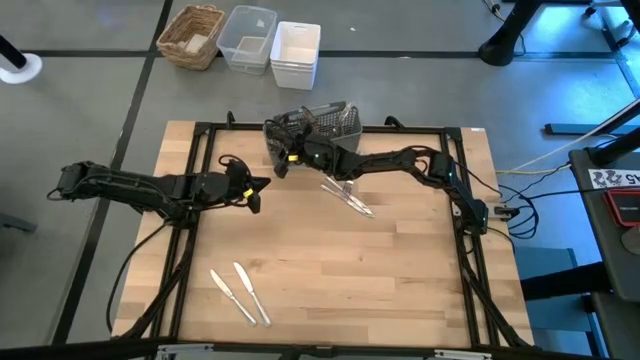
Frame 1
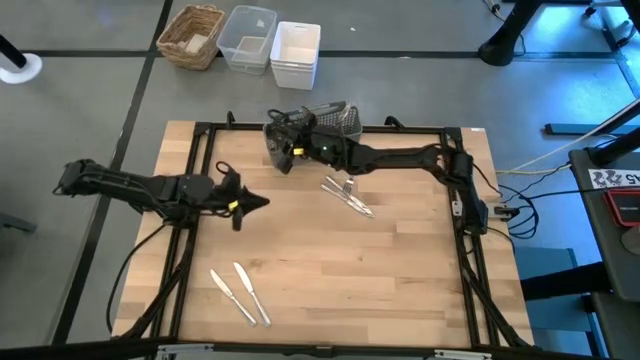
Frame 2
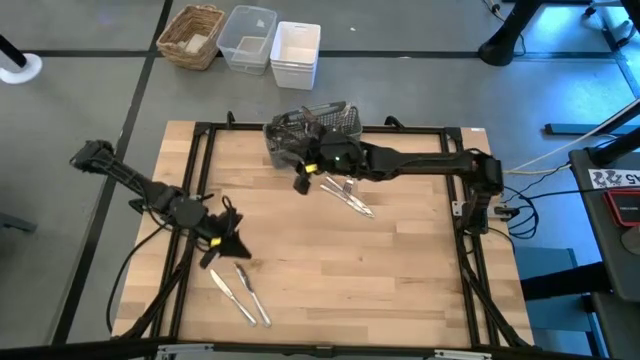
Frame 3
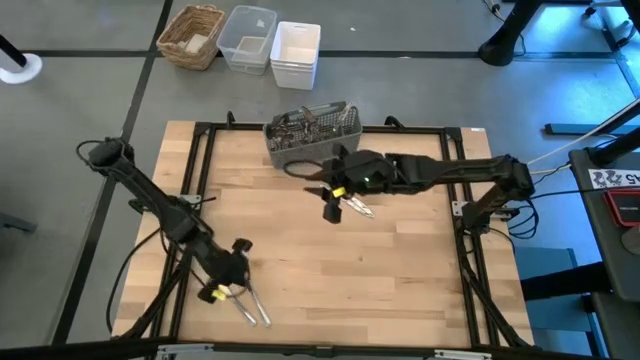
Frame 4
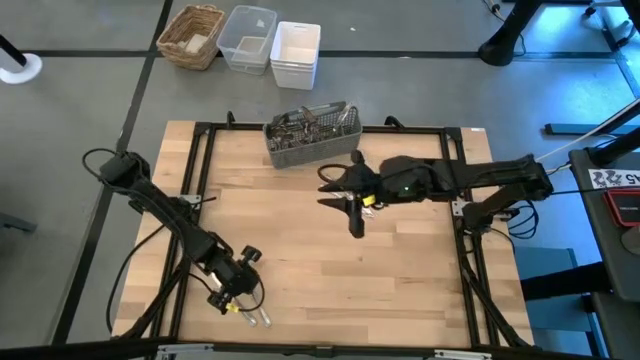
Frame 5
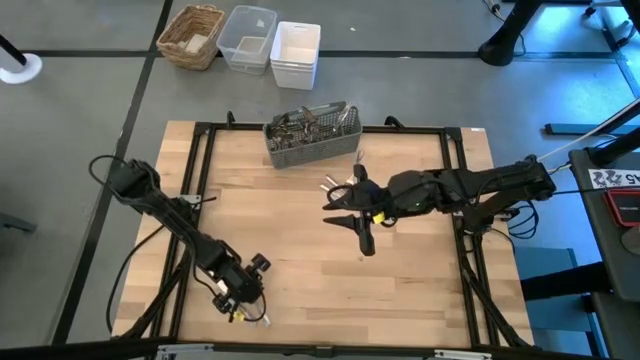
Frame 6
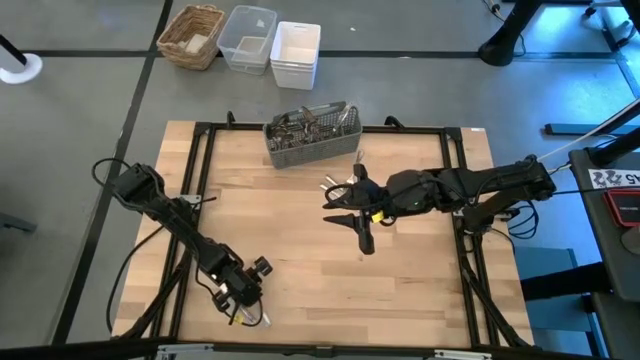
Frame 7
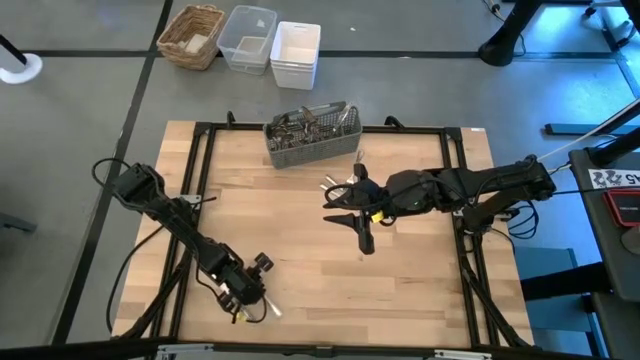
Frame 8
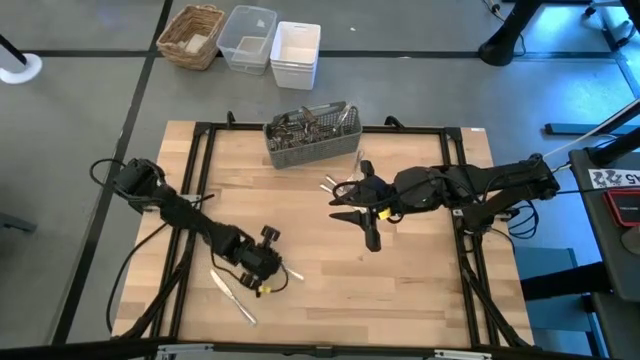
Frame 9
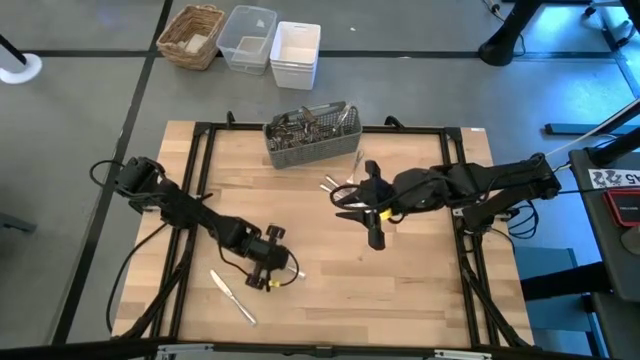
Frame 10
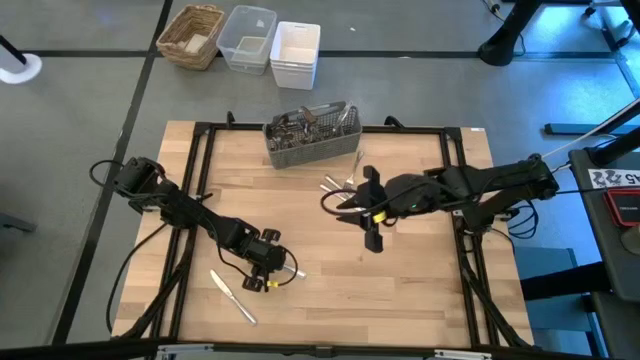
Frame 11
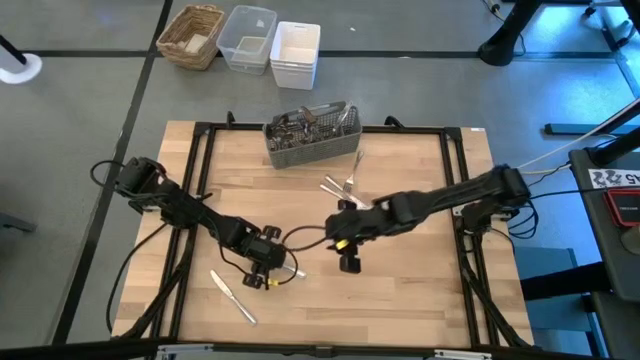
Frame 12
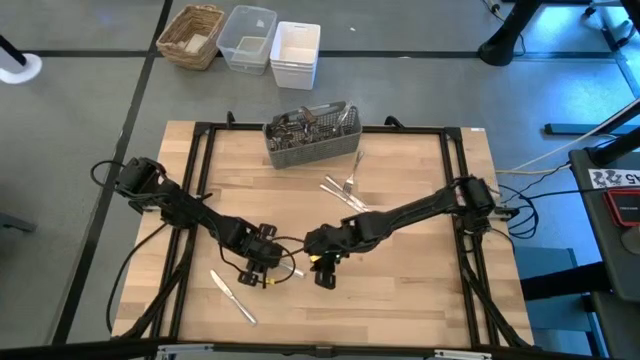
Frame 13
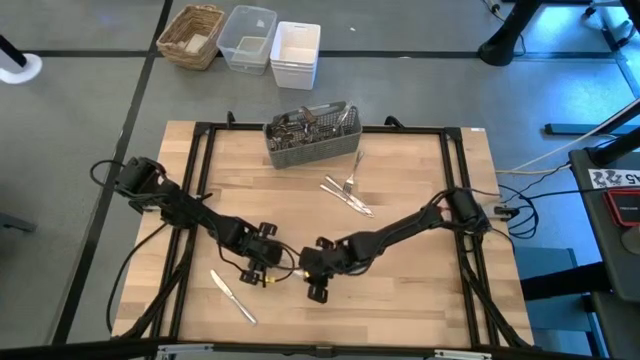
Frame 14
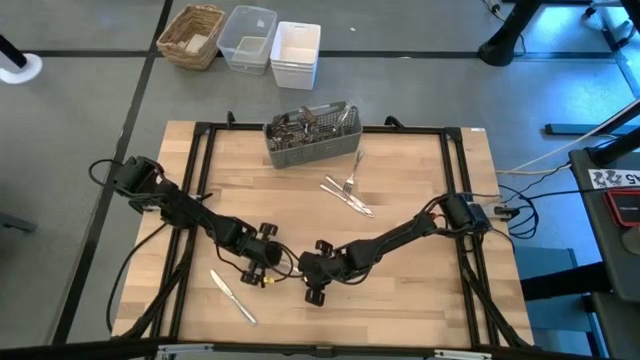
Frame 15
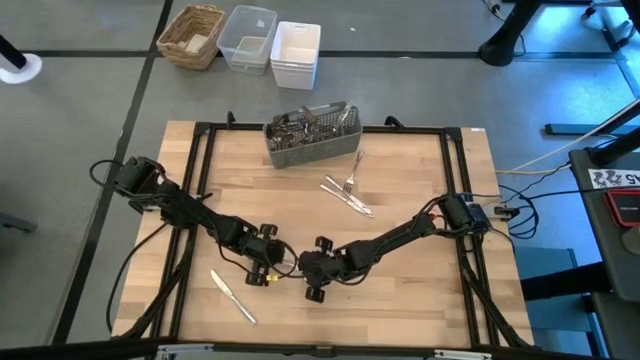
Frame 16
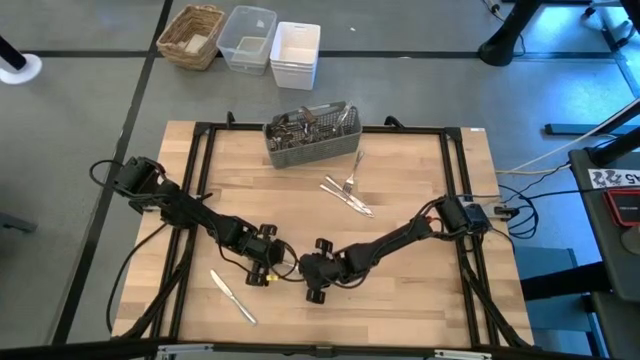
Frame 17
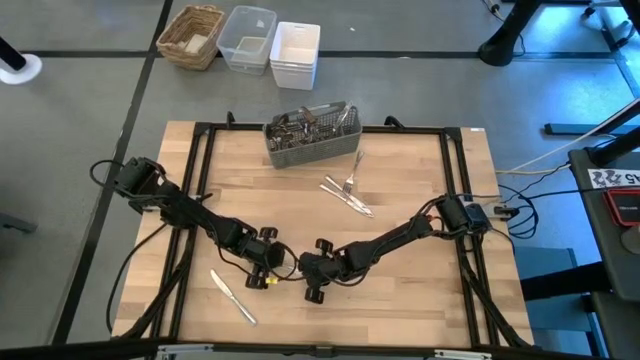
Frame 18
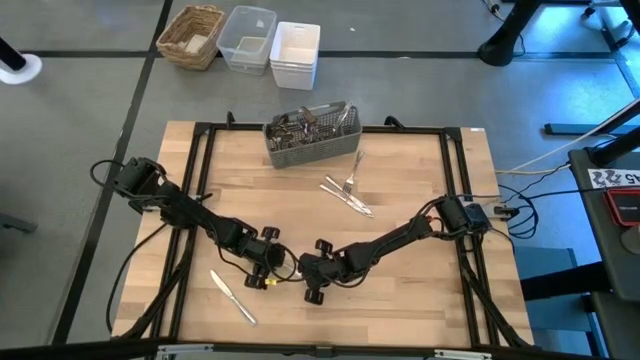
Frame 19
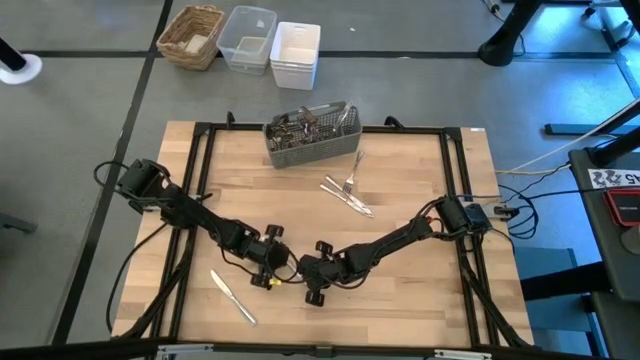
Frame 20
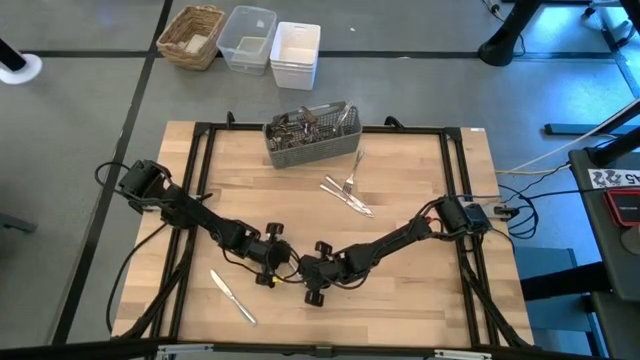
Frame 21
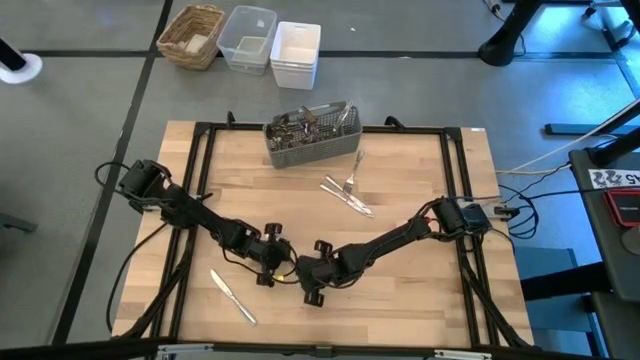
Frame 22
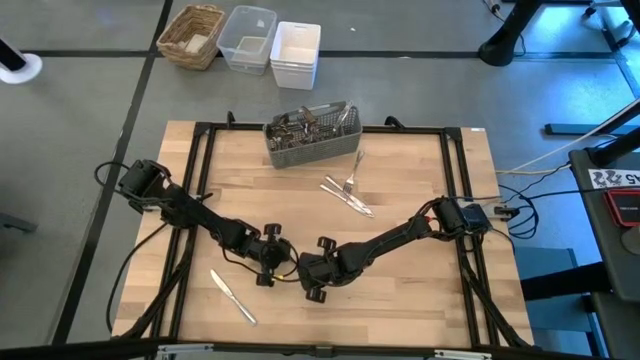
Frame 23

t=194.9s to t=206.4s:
Task: Sort silverware
Put the silver spoon into the silverware rack

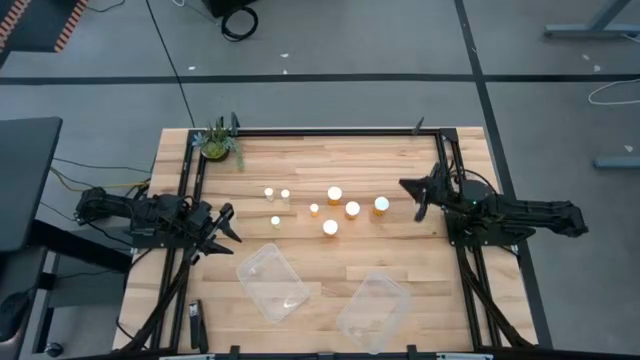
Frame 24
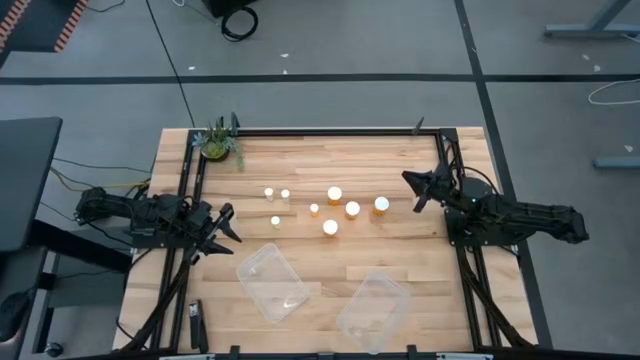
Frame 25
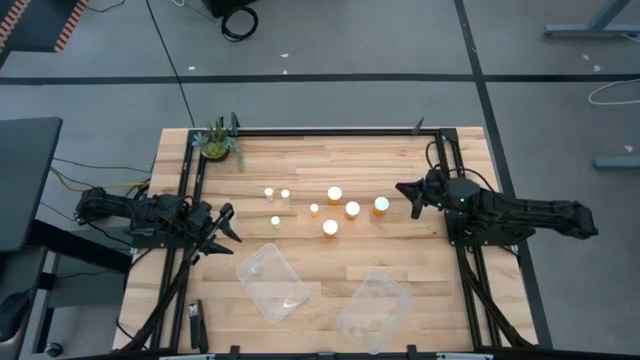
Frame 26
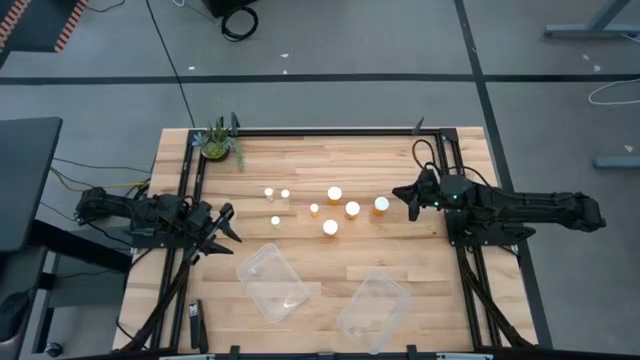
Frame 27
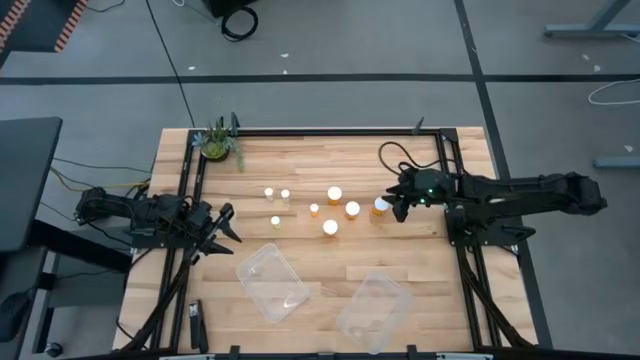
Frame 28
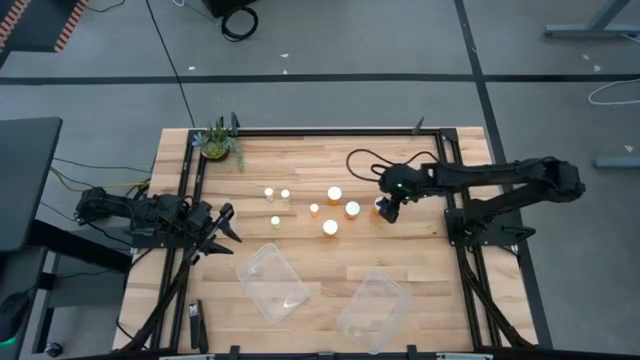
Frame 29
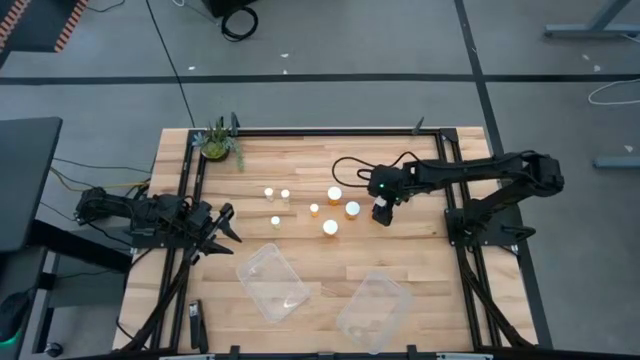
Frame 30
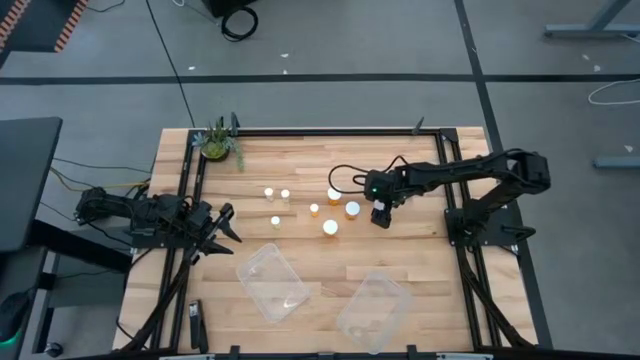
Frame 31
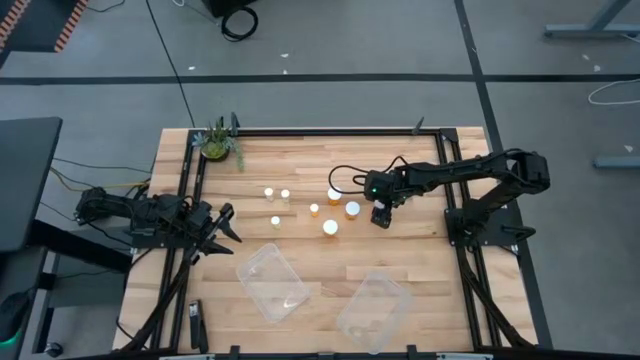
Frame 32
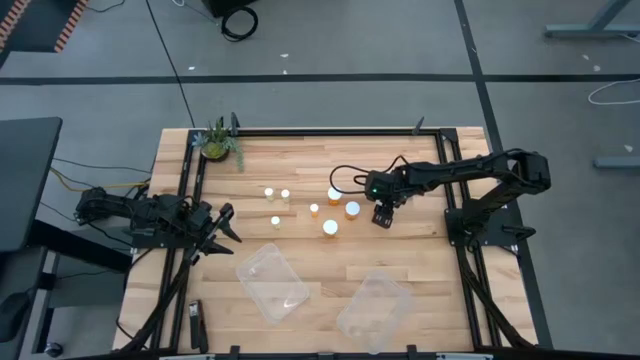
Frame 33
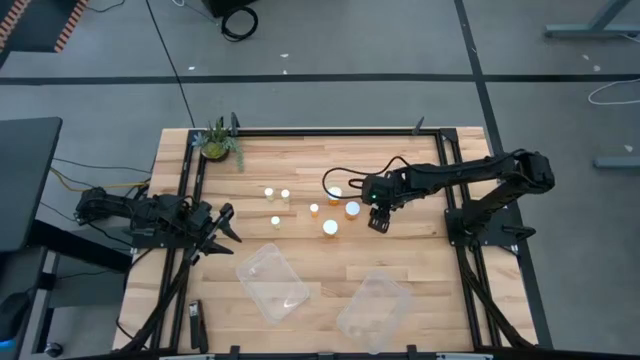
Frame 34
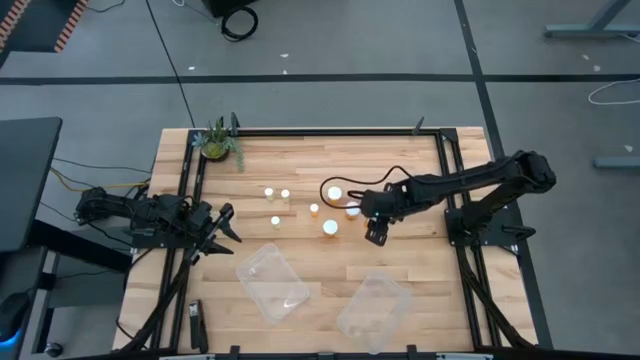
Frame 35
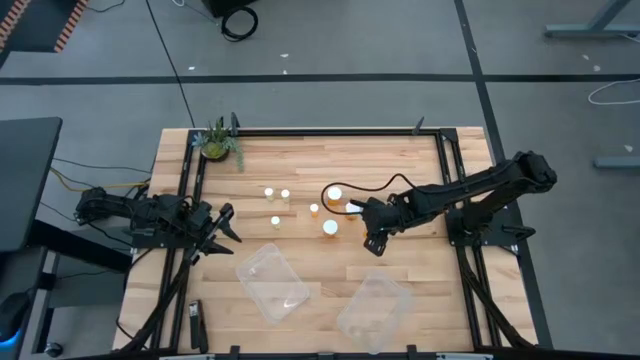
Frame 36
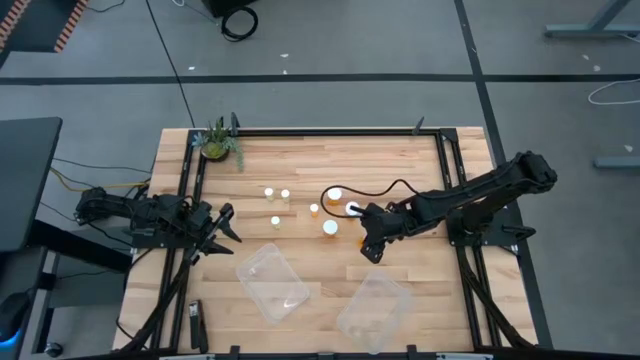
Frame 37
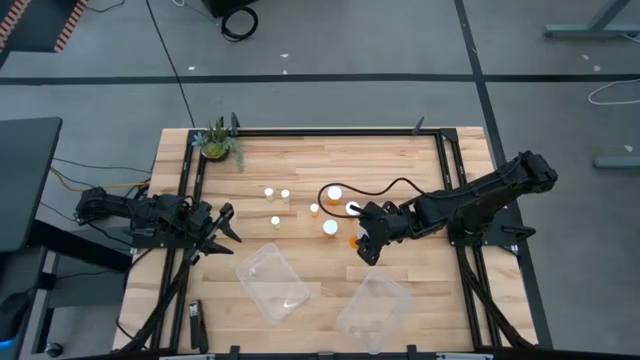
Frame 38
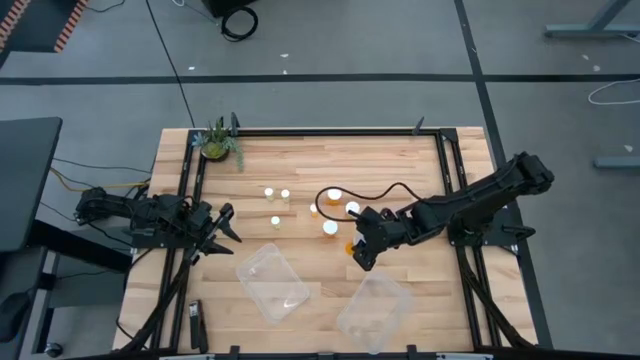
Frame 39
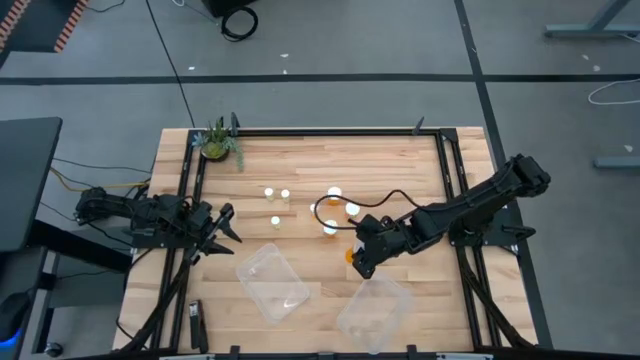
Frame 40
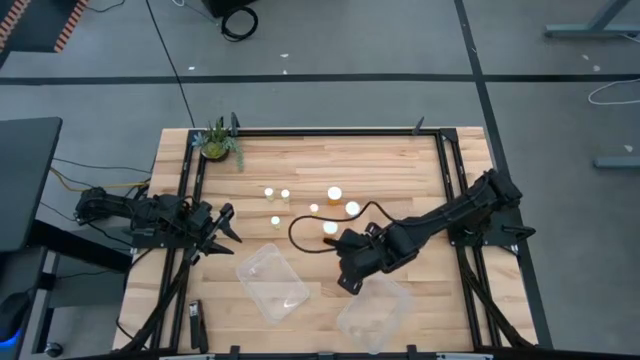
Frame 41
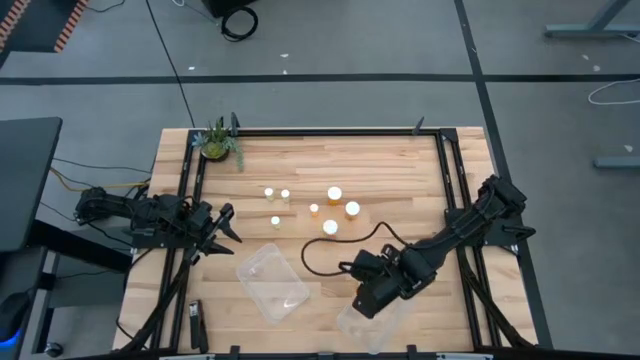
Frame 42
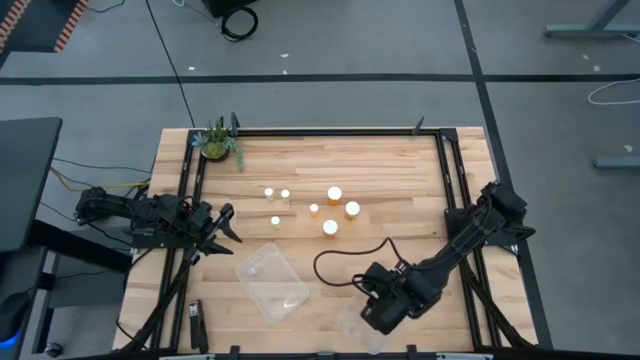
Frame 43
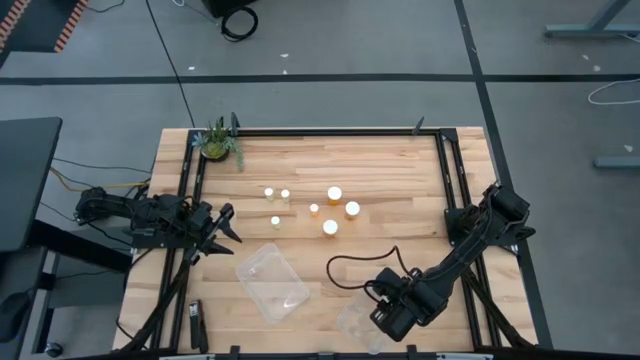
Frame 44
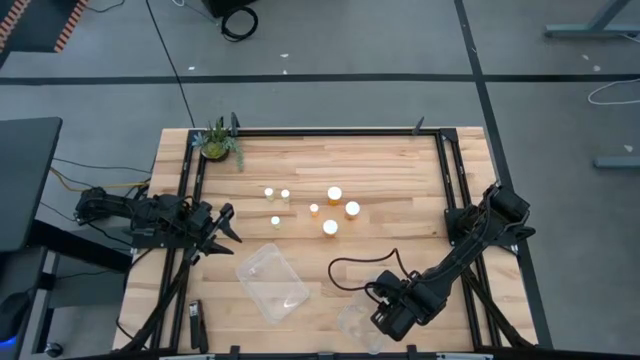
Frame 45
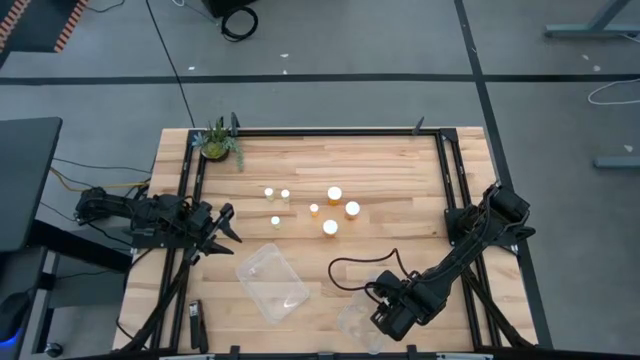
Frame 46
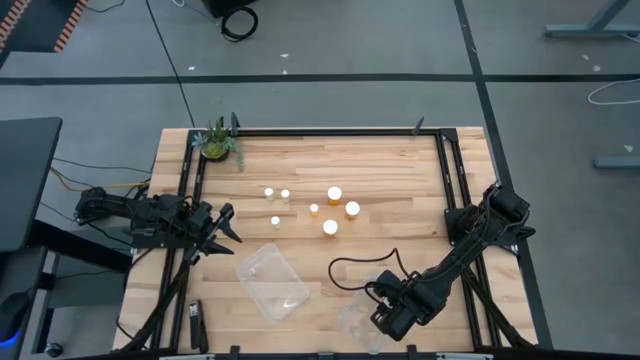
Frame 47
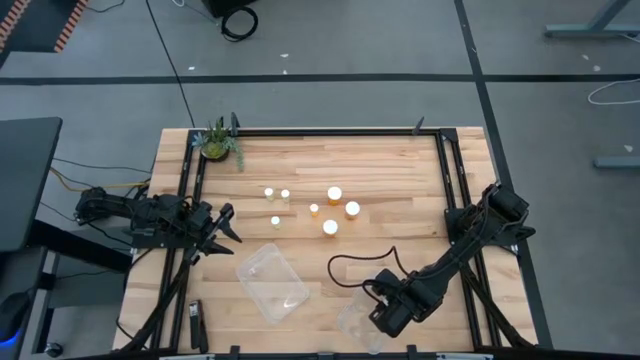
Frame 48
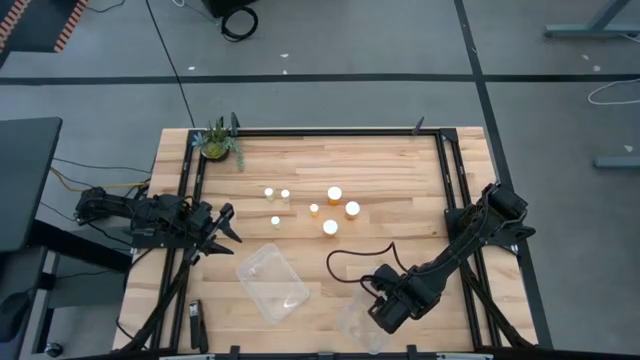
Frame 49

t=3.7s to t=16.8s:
Task: Pick and place medicine bottles into bin by pill shape (circle, oval)
Put the large orange pill bottle into the right transparent bin
